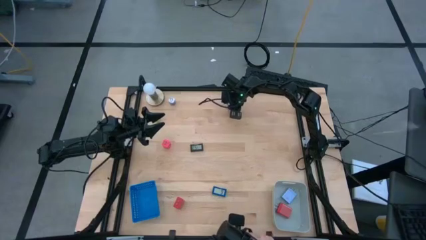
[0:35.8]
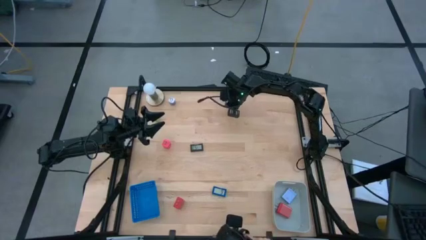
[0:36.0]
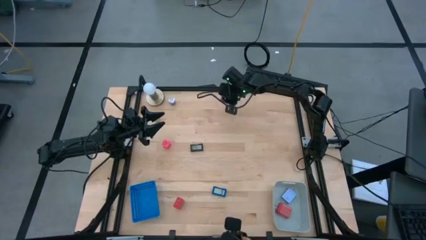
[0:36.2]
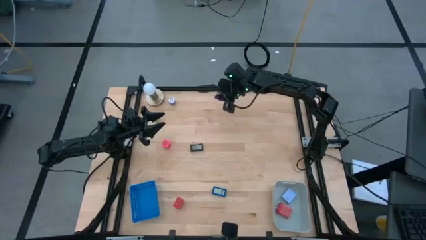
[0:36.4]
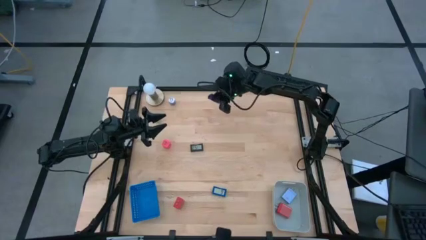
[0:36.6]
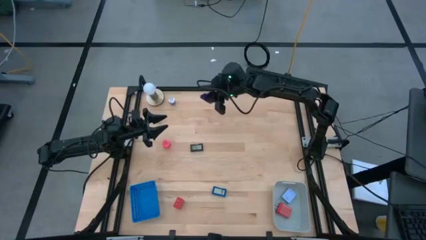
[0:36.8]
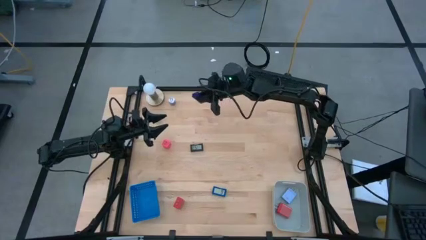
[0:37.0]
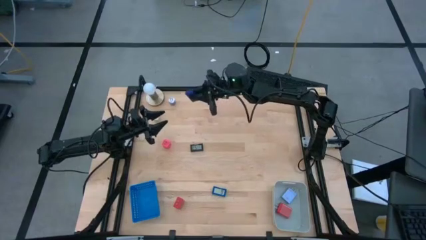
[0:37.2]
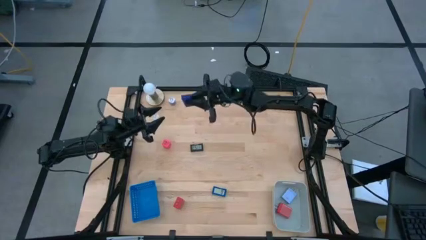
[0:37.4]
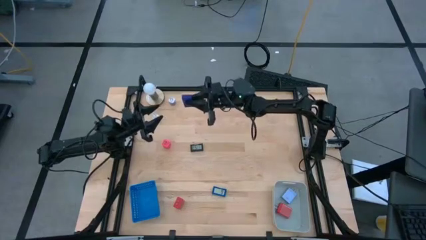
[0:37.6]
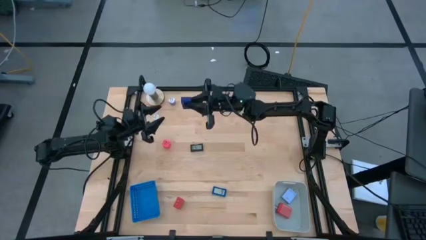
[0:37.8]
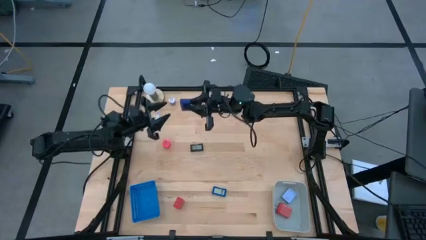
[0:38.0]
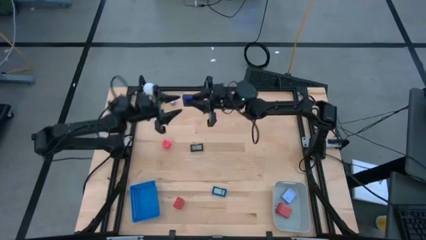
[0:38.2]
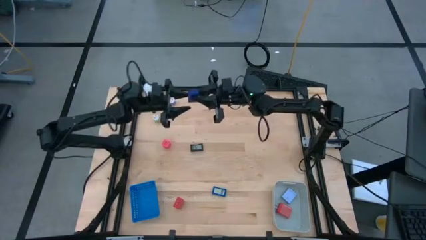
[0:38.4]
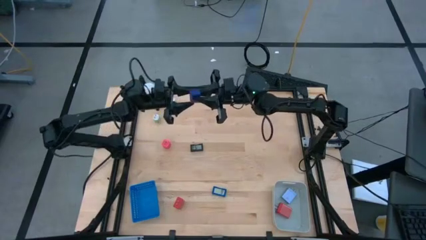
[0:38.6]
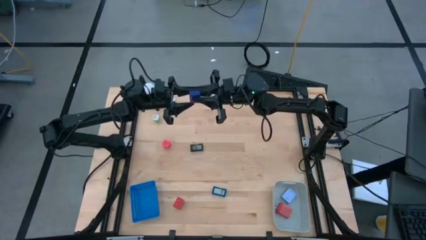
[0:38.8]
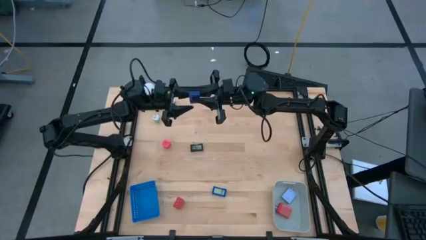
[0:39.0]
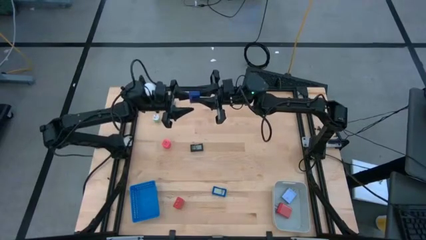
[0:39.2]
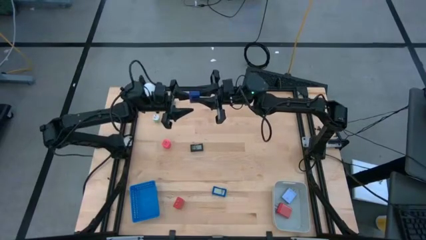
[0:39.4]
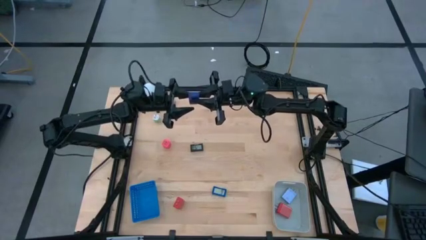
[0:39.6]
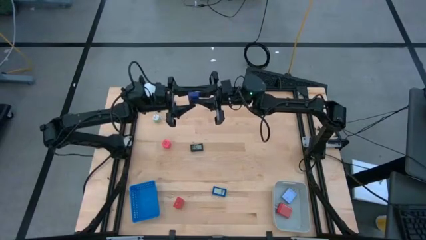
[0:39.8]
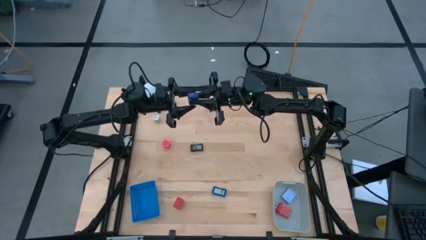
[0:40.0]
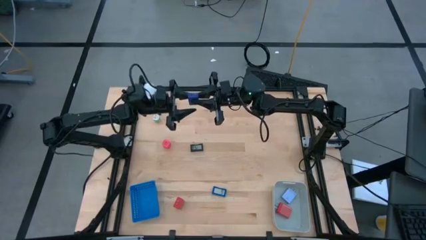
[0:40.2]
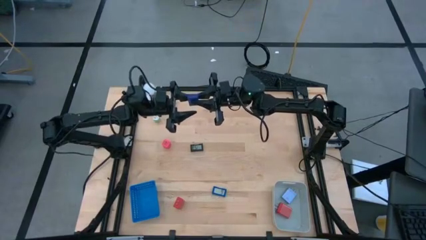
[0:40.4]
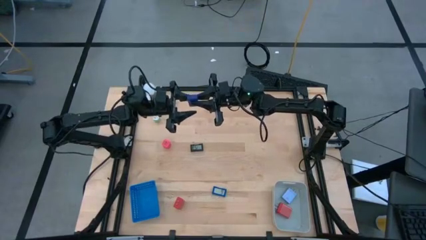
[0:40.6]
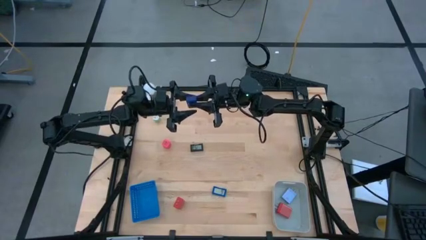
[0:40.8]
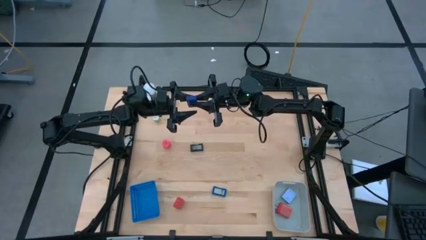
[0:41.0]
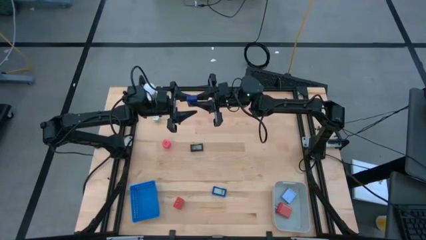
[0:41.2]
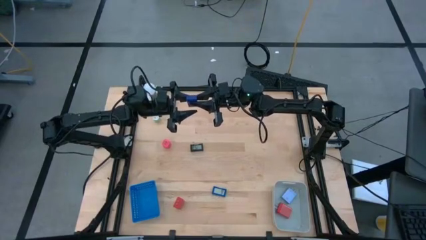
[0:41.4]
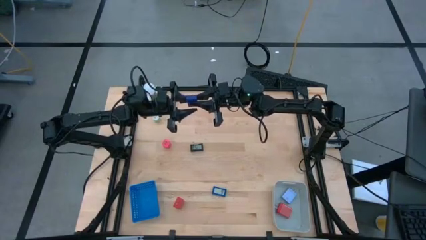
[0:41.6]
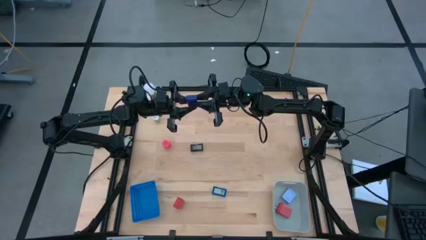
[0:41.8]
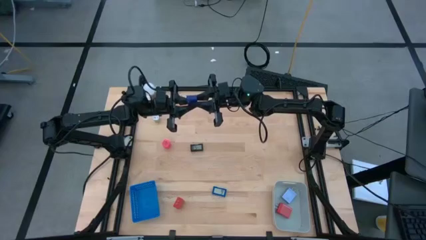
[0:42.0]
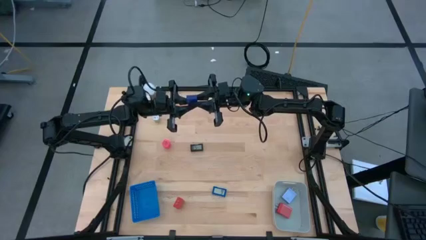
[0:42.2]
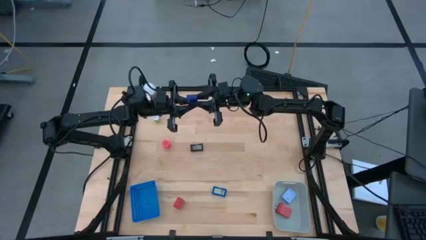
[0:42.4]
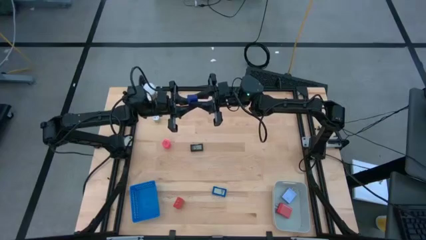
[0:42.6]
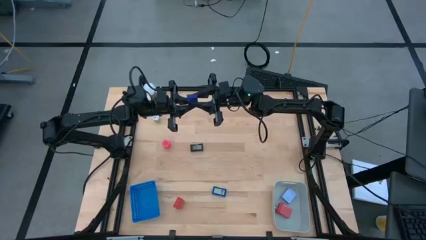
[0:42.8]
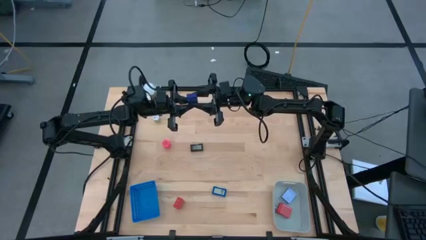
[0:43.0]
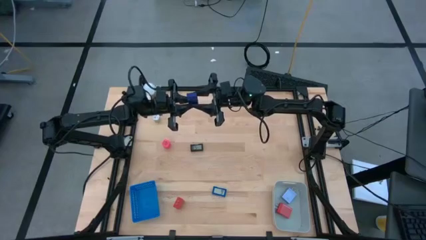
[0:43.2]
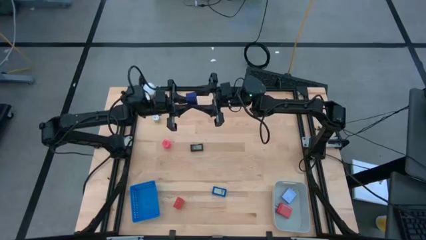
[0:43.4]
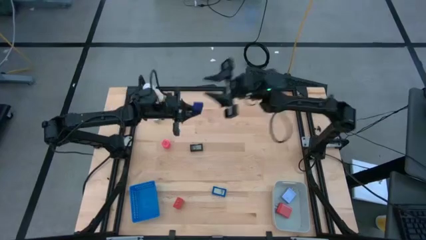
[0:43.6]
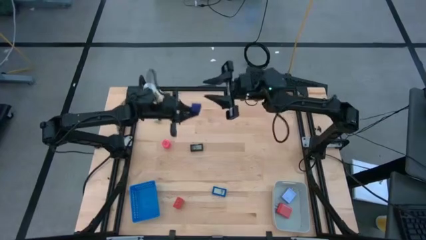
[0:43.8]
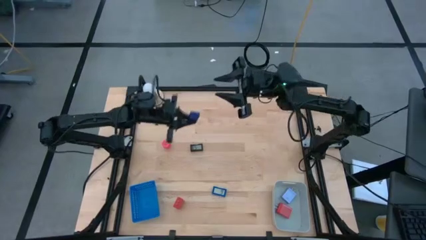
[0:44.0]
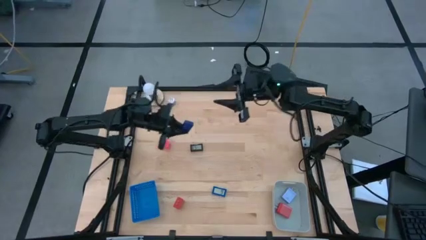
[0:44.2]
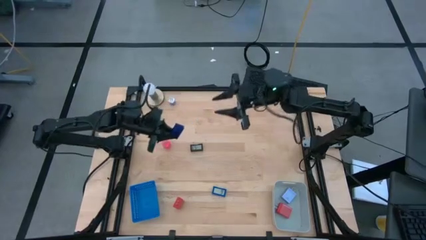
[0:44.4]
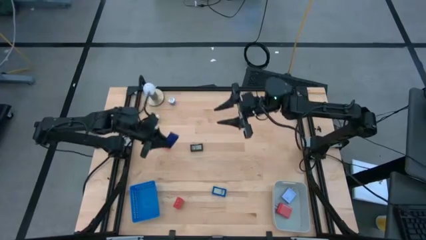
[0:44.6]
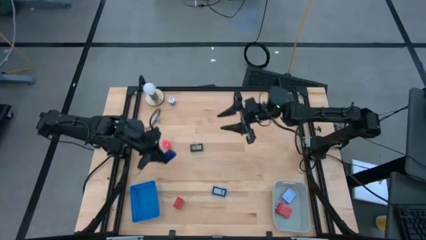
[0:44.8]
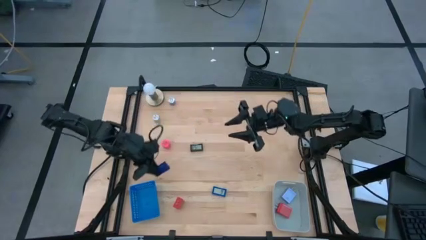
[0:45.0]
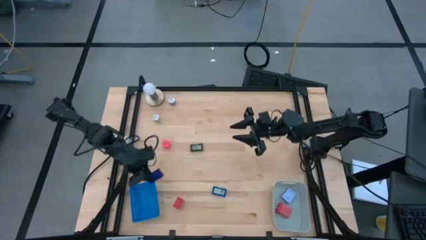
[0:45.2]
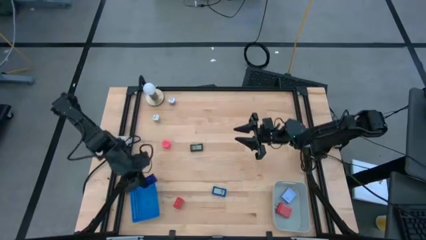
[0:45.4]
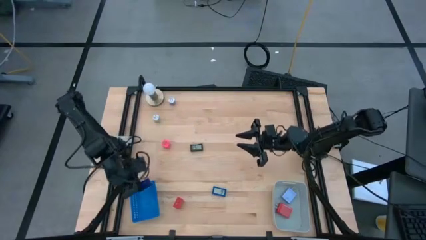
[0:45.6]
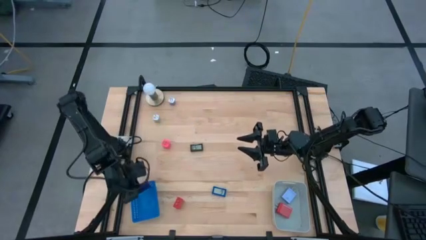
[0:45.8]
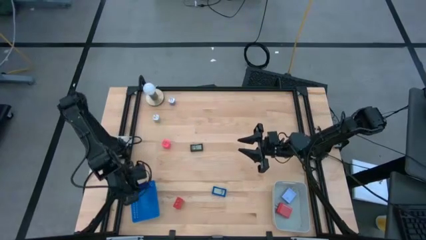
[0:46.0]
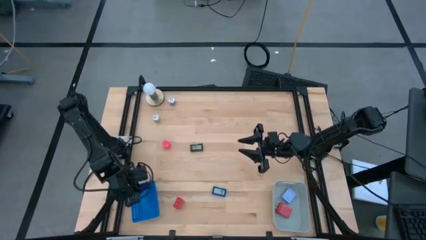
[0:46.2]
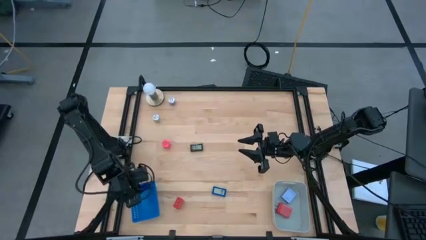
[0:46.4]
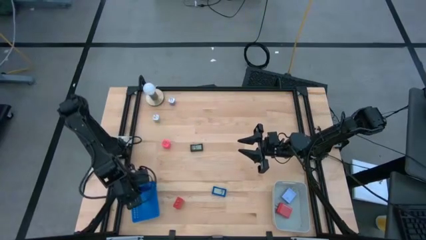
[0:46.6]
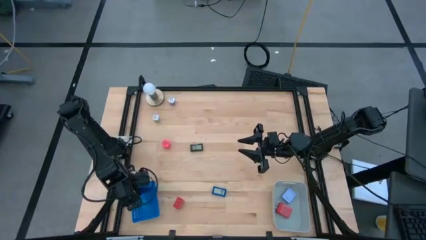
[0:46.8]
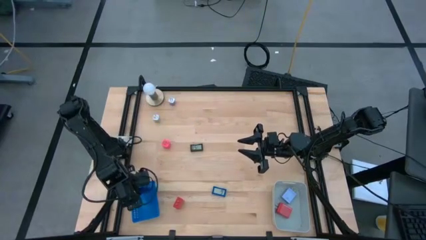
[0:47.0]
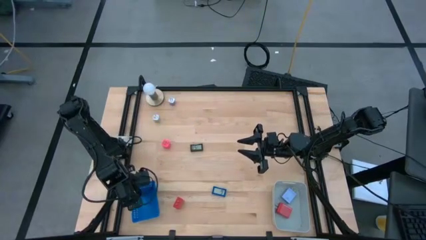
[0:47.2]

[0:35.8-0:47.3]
Task: Pick & Place Office items
Put the purple digital timer into the blue bin

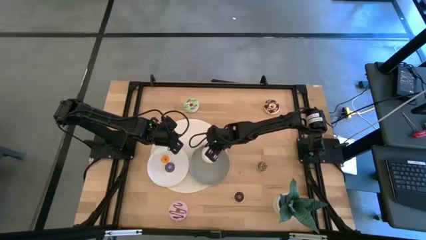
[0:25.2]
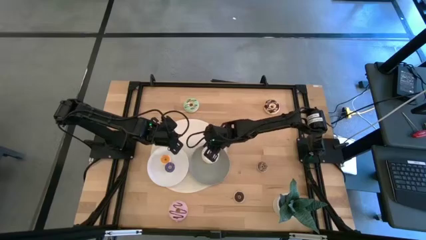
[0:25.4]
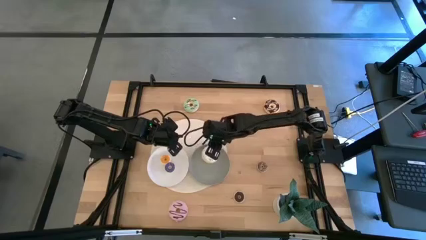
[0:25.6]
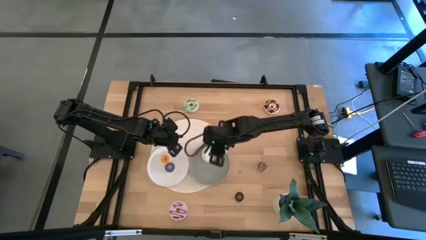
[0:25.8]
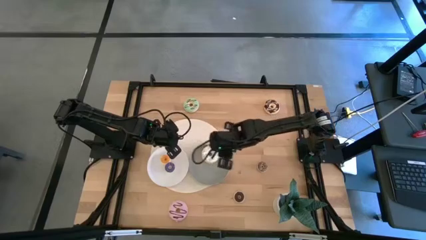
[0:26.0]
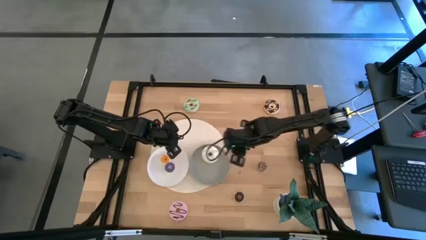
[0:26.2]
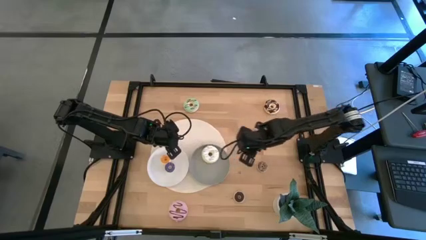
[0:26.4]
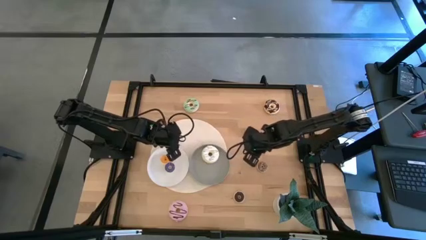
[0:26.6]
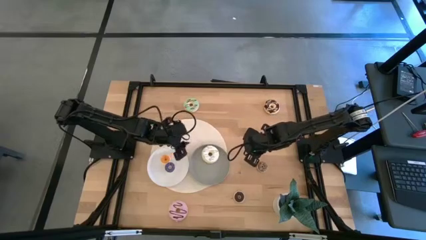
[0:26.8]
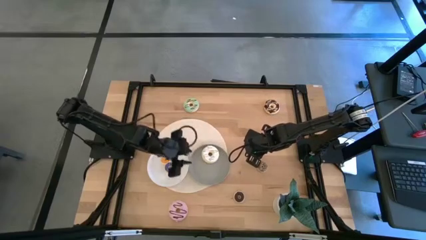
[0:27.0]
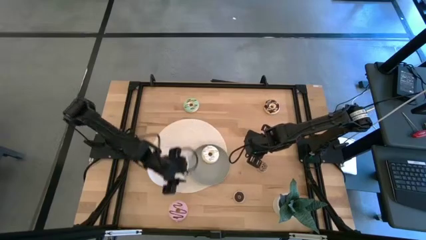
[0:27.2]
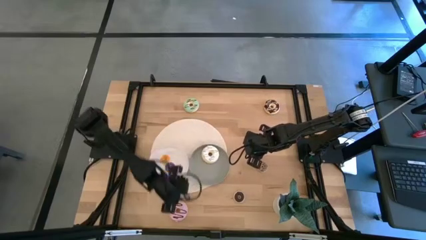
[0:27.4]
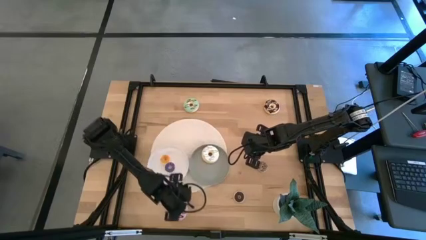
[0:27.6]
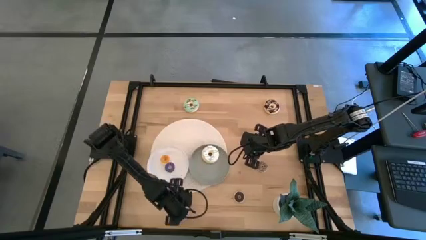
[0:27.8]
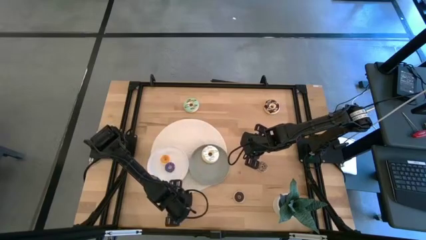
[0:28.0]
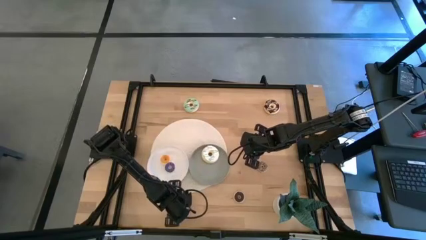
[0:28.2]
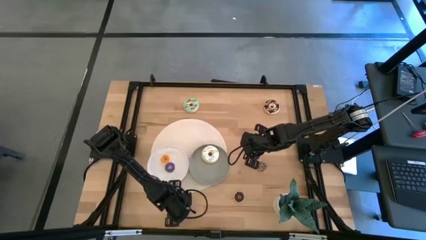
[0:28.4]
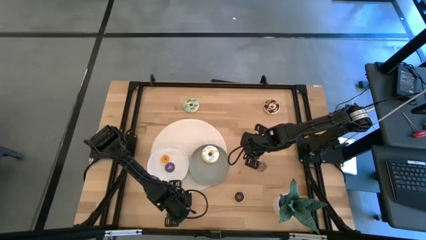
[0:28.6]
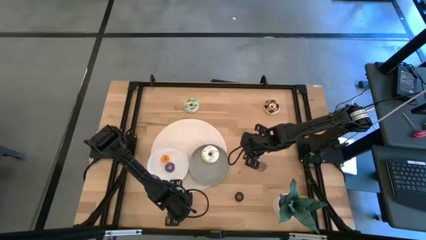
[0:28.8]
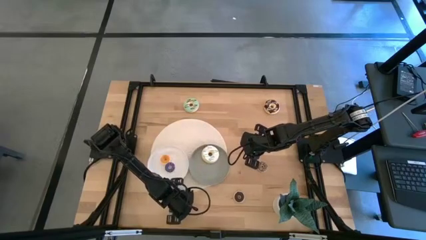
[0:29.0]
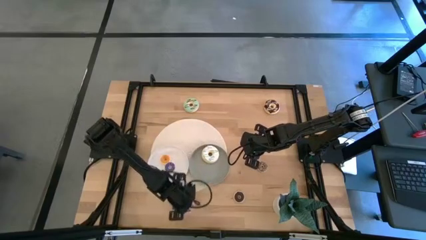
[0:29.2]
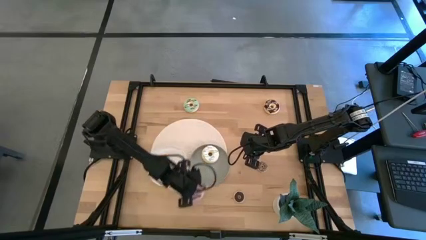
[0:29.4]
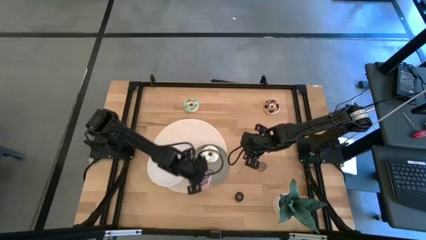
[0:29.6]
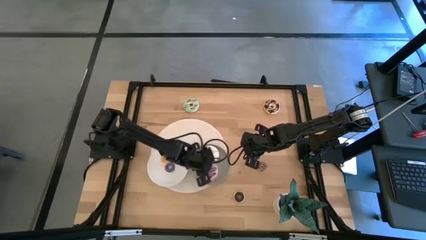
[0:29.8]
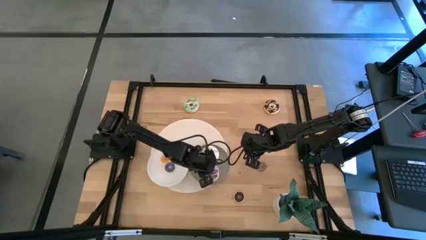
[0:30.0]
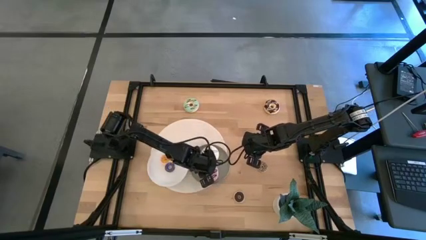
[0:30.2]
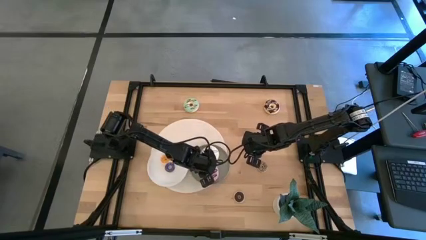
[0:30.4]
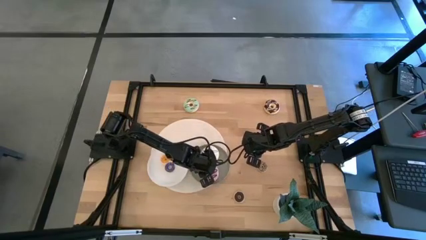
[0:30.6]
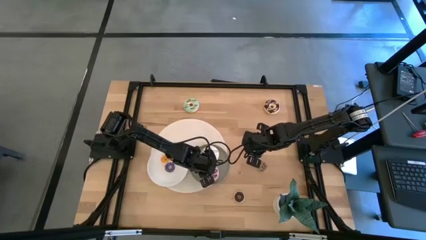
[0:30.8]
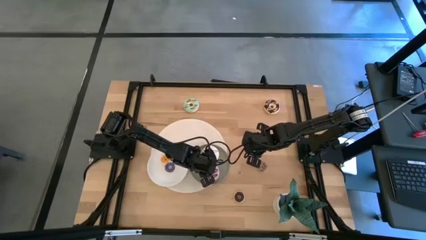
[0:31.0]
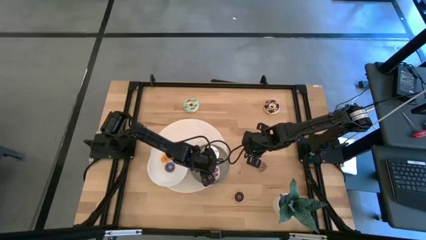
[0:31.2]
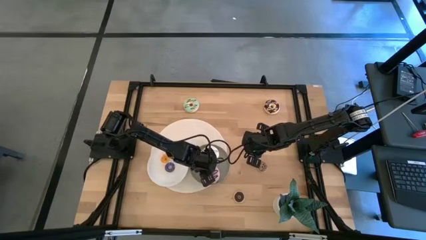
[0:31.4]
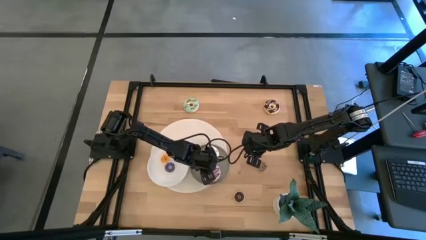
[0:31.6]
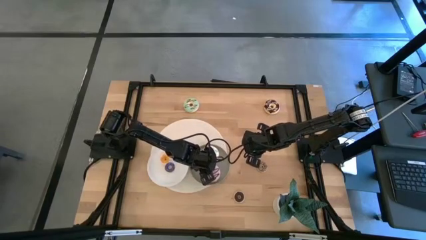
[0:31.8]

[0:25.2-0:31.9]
Task: Pick & Place donuts
Put the big pink donuts on the gray plate
